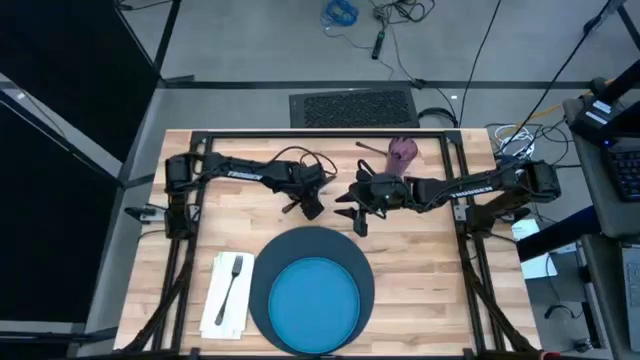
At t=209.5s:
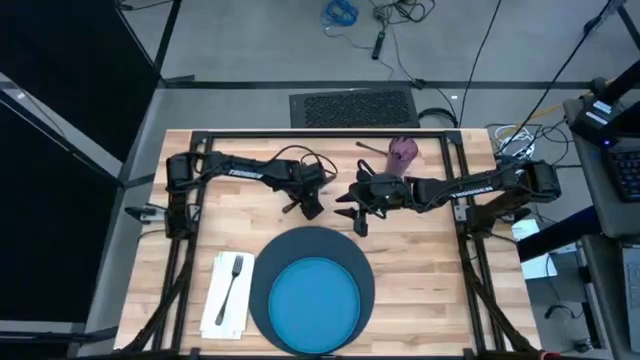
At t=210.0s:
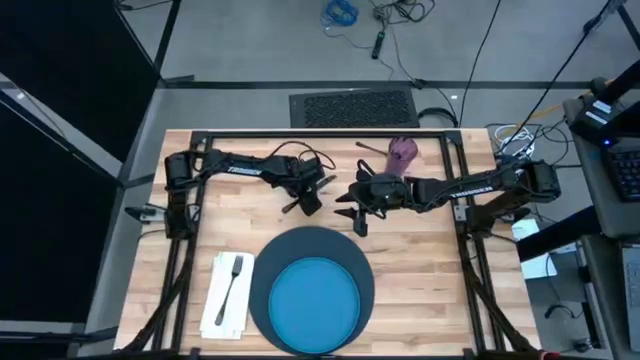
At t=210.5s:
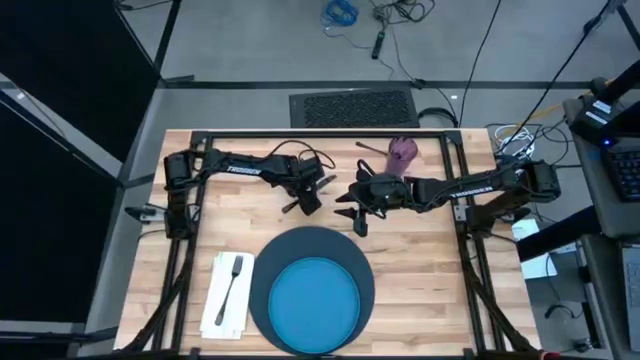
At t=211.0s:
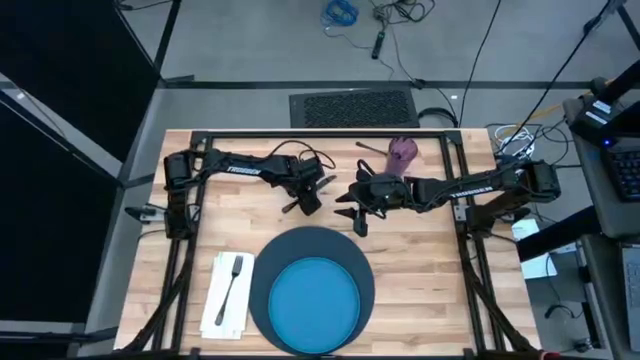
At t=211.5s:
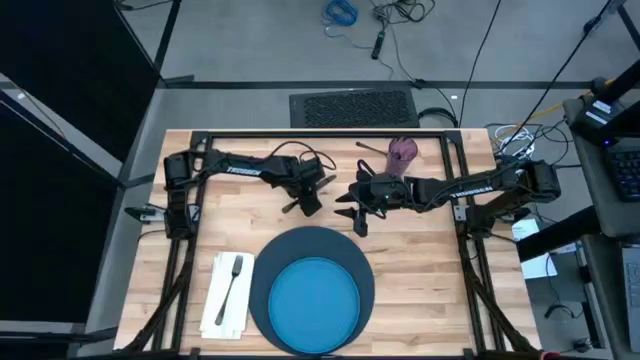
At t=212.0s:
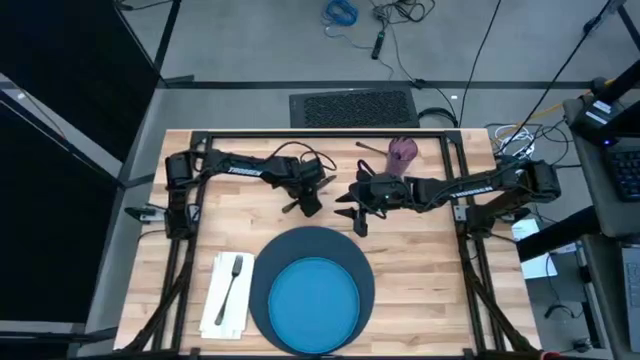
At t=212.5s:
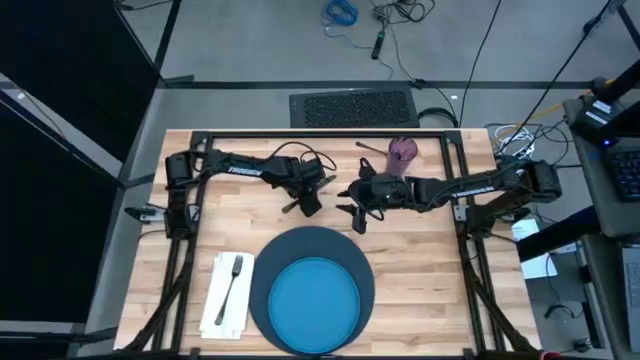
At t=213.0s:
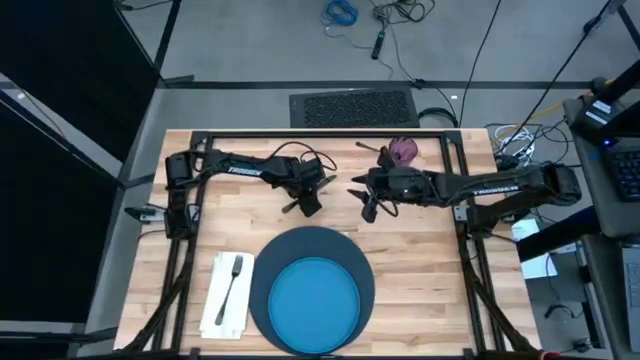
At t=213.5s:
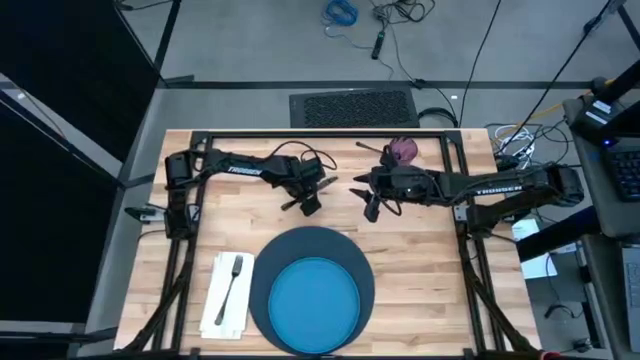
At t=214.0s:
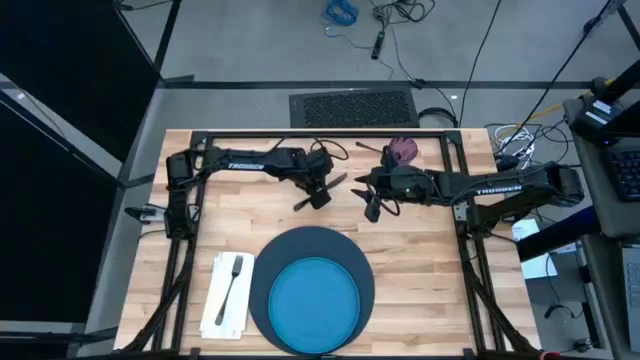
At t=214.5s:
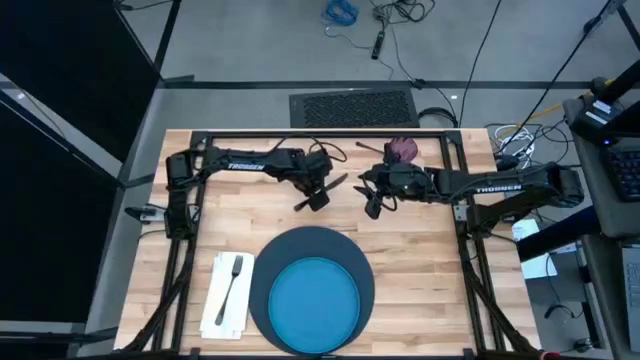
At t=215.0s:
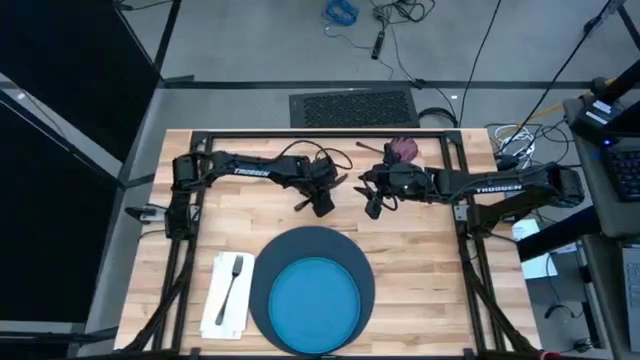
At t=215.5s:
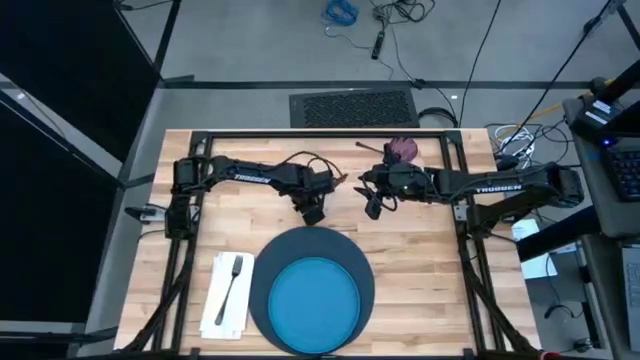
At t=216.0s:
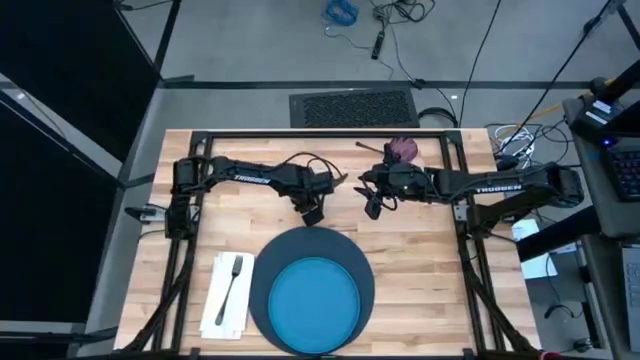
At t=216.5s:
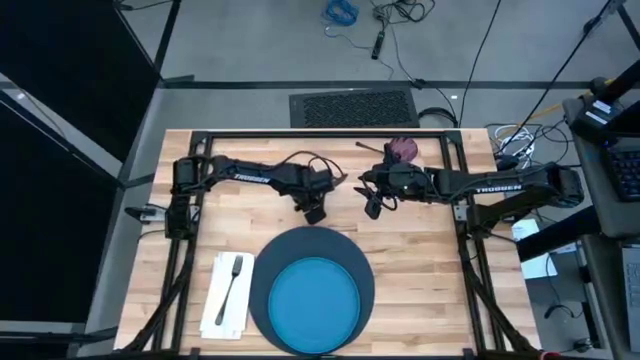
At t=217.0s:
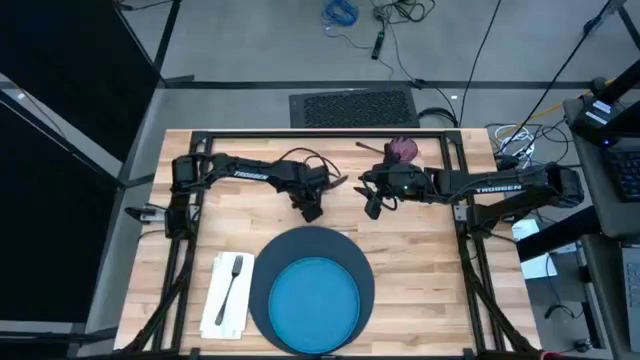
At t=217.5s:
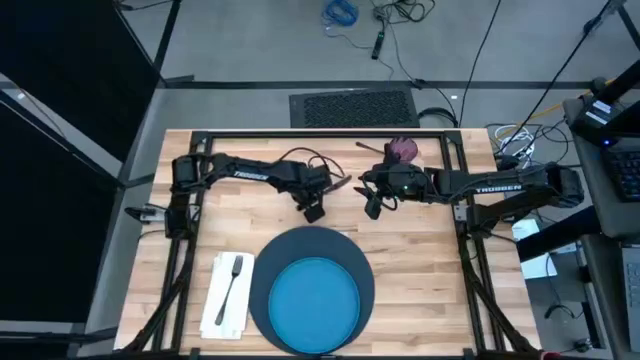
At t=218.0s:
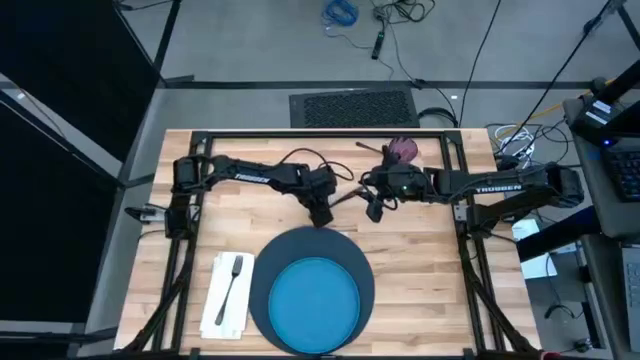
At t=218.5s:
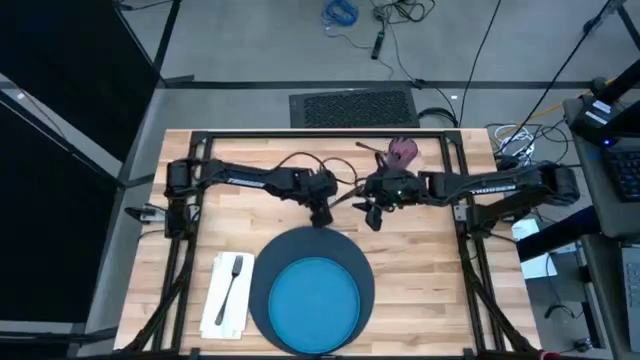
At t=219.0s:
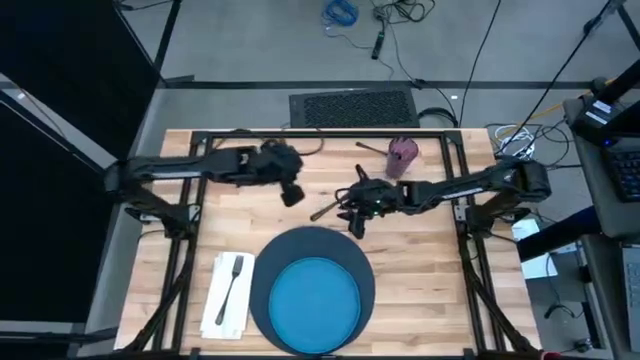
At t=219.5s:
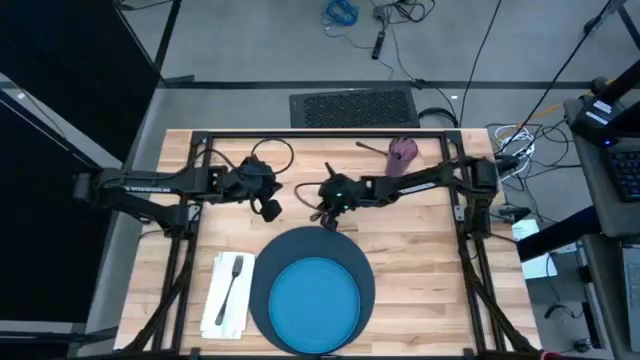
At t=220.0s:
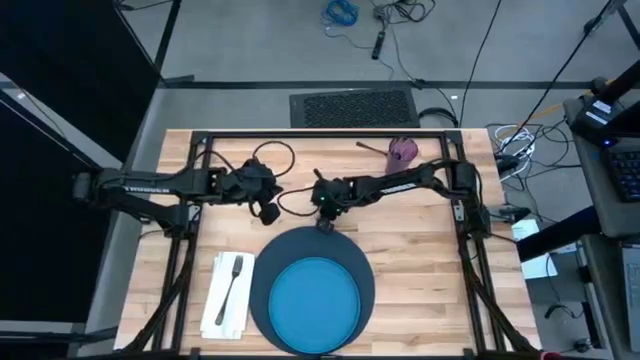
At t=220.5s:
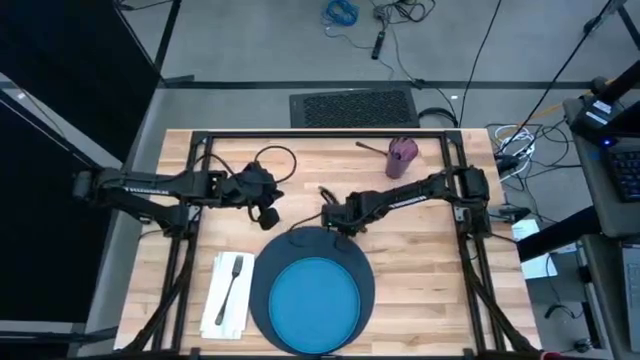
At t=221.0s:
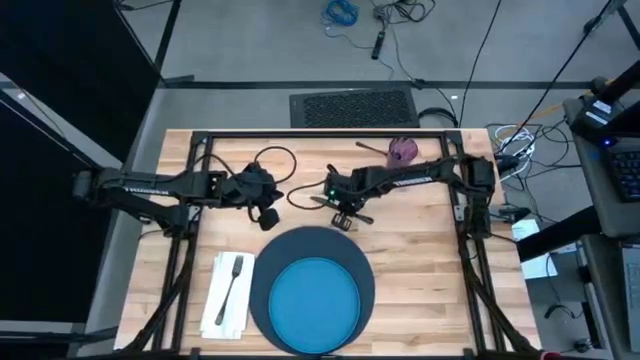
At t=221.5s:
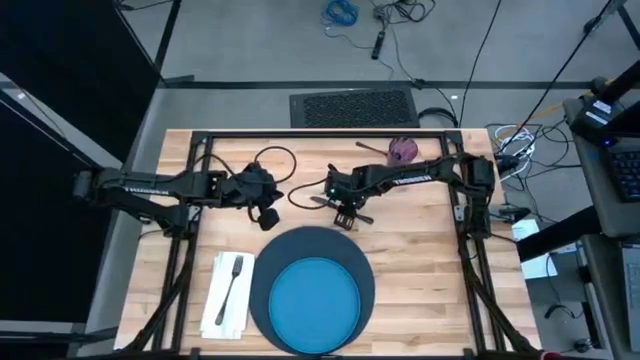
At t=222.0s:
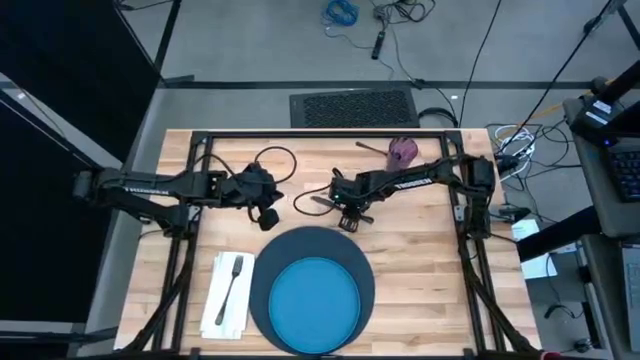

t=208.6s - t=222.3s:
Task: Set table place
Put the knife to the right side of the blue table mat

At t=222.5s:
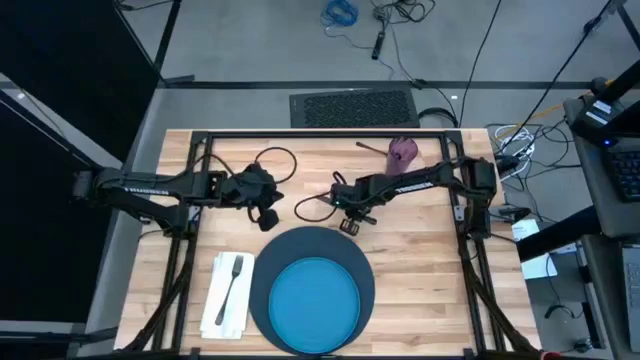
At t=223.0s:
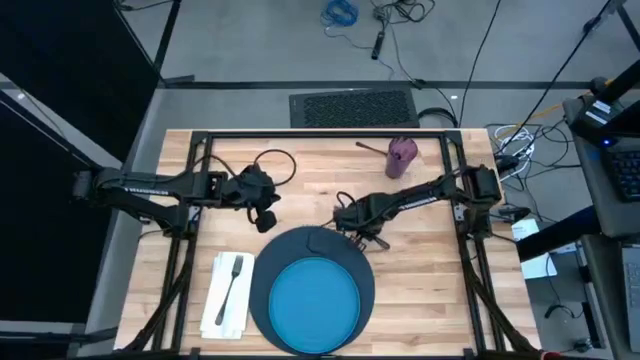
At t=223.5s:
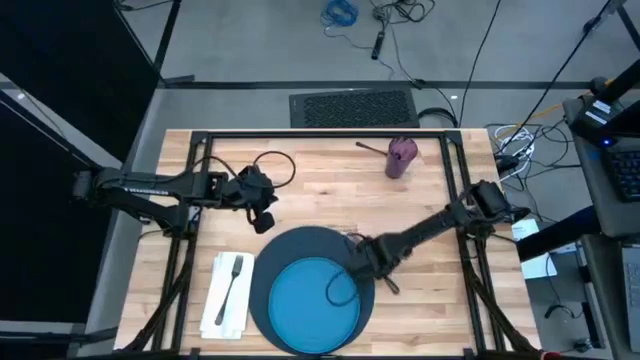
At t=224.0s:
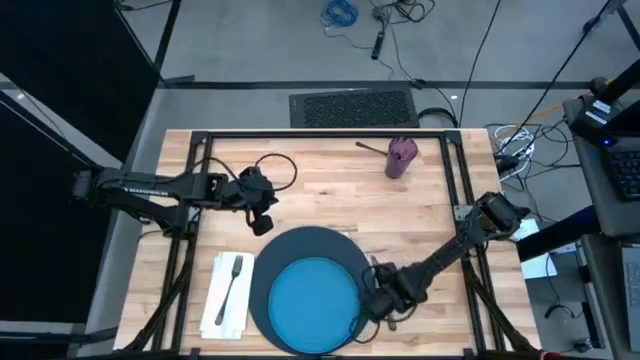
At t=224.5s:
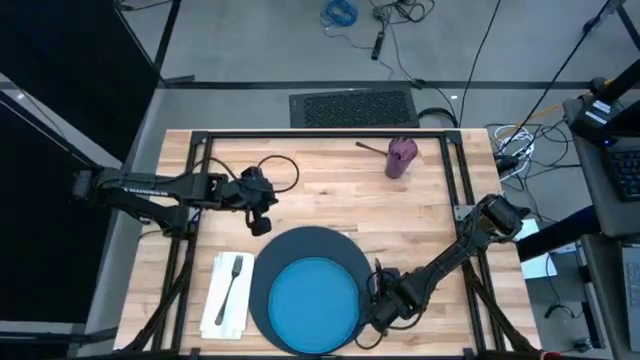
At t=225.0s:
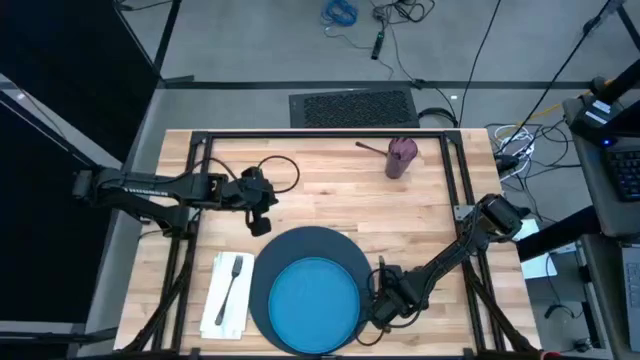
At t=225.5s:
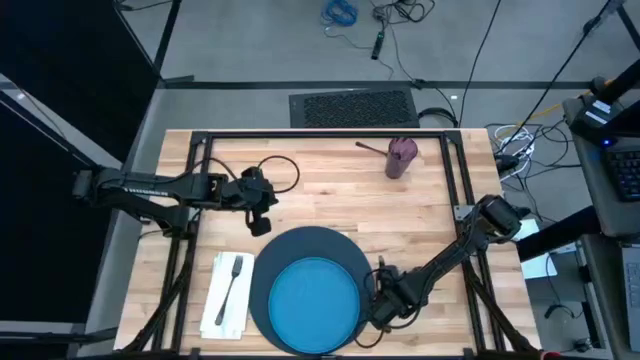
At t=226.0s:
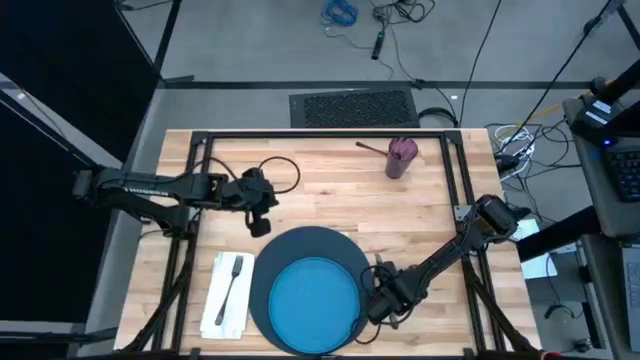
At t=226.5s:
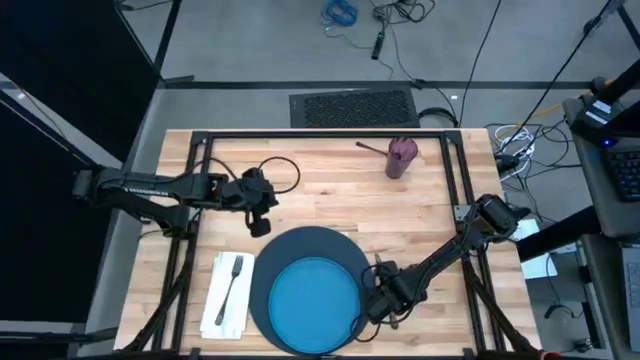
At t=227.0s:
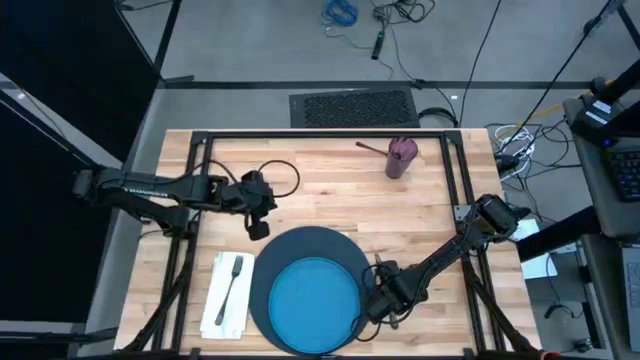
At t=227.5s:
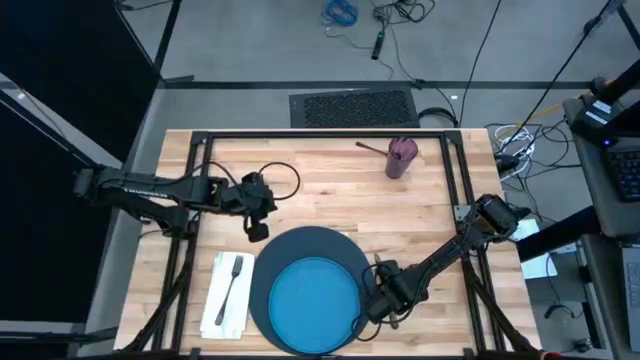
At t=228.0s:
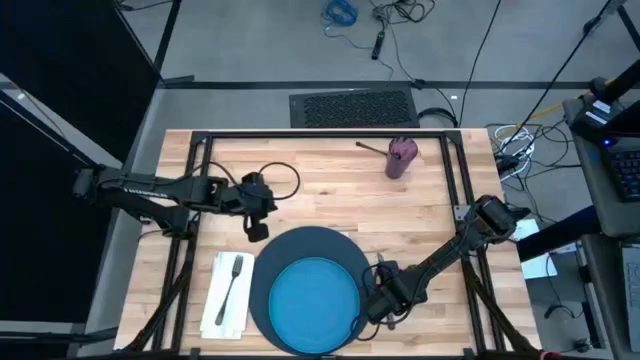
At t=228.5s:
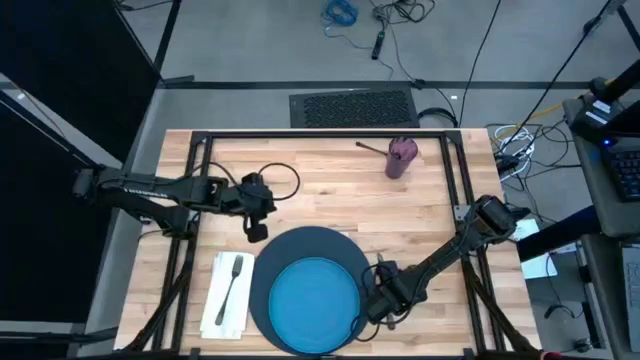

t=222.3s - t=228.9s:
Put the knife to the right side of the blue table mat

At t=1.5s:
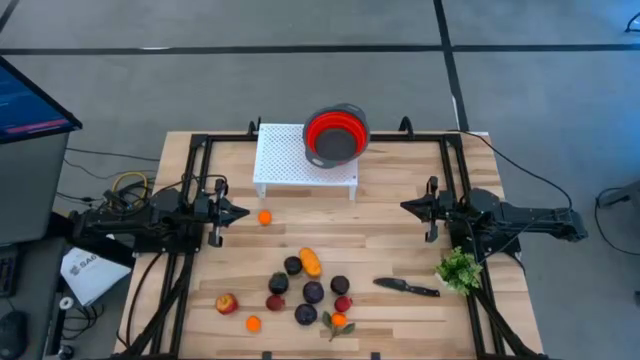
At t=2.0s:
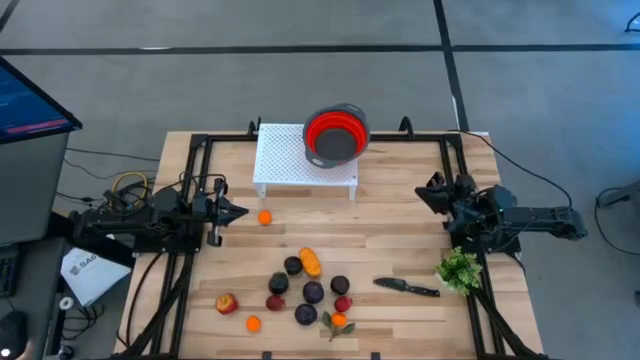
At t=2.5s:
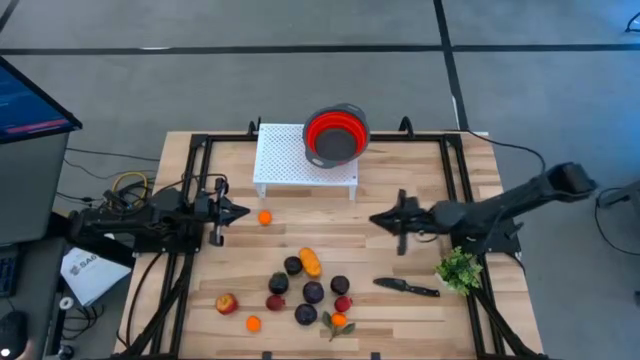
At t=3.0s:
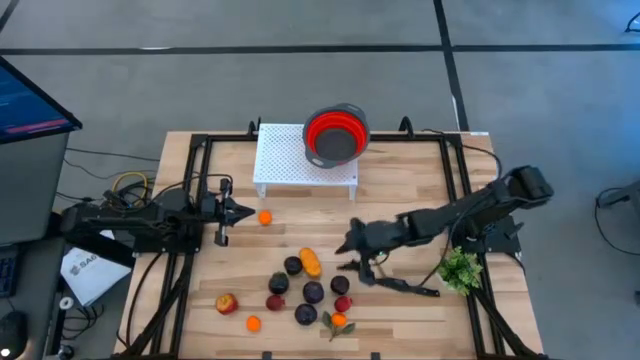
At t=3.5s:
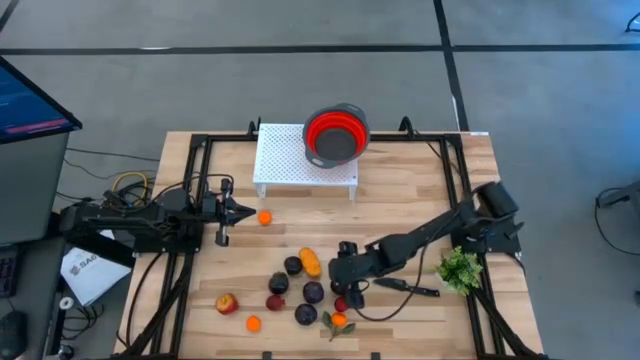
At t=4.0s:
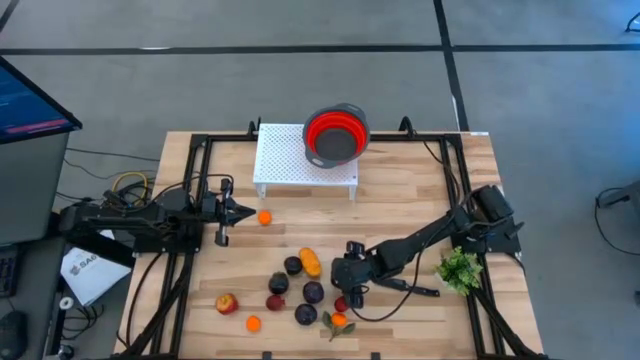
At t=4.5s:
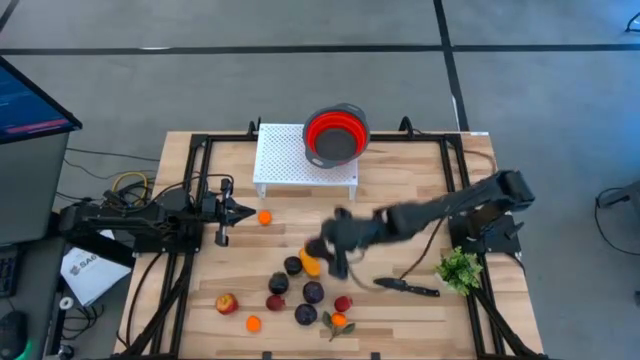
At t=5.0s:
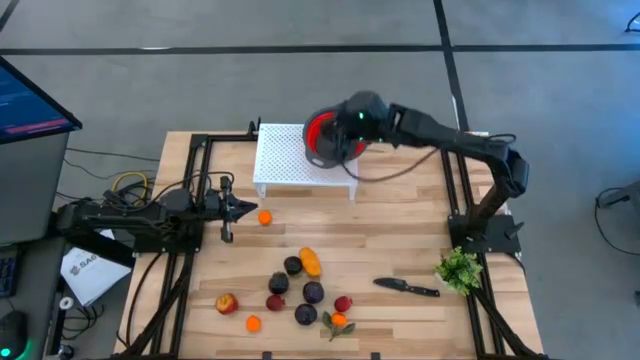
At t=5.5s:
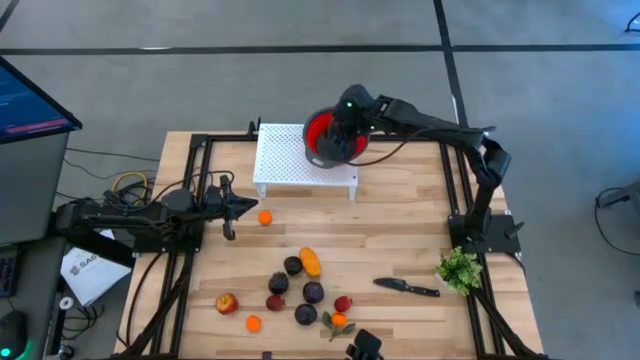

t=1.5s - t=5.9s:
Task: Pick & Place Fruit
Put the plum into the red strainer on the shelf
